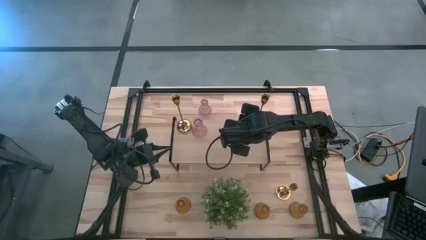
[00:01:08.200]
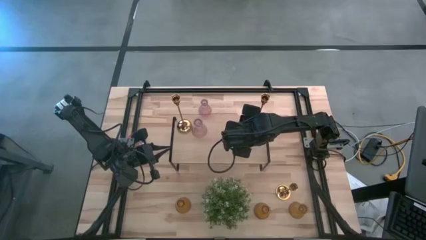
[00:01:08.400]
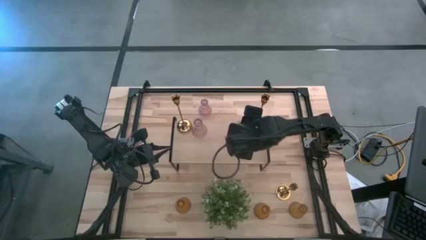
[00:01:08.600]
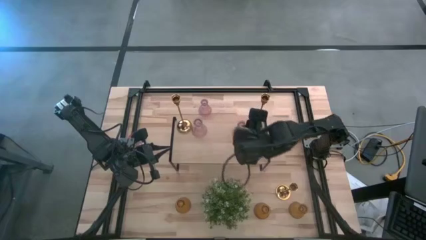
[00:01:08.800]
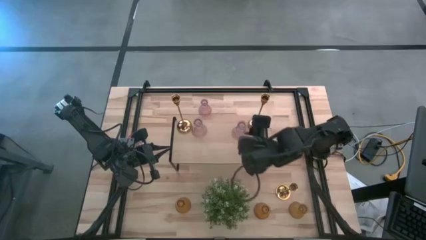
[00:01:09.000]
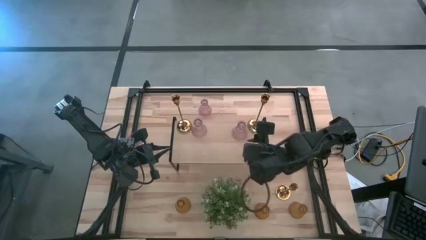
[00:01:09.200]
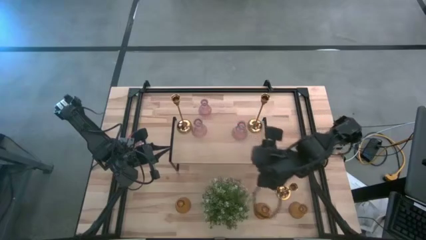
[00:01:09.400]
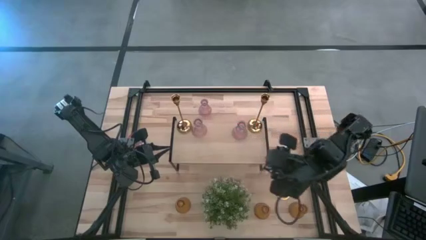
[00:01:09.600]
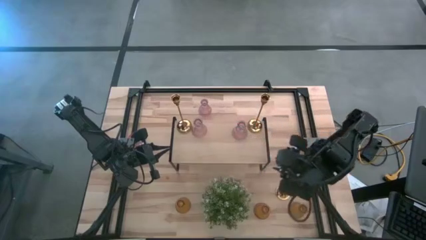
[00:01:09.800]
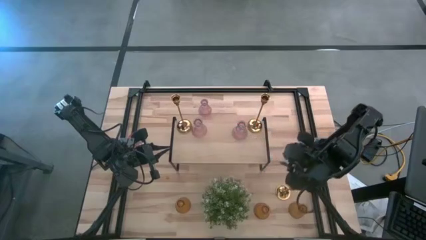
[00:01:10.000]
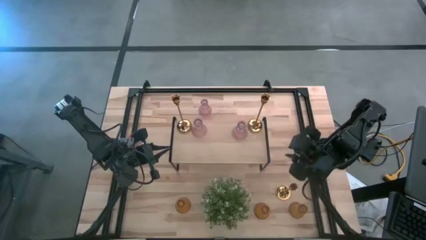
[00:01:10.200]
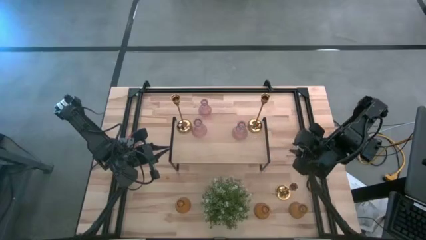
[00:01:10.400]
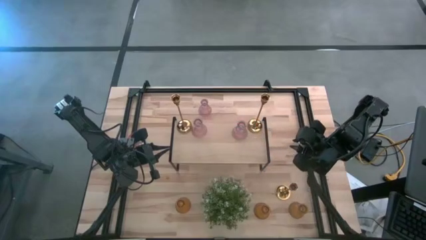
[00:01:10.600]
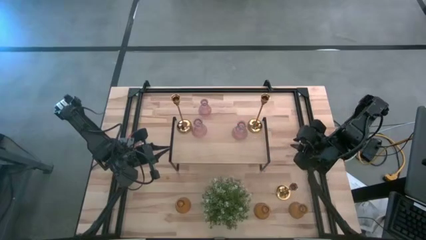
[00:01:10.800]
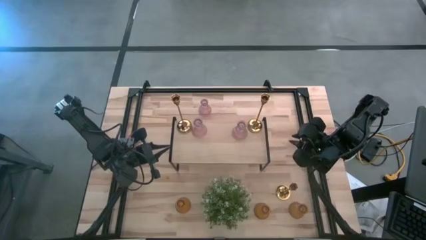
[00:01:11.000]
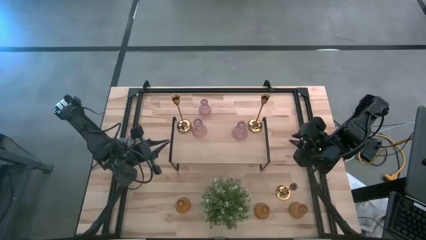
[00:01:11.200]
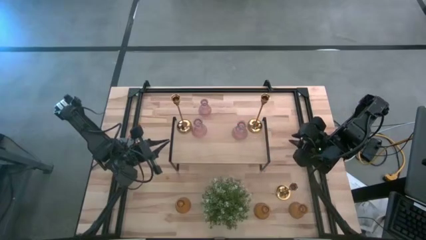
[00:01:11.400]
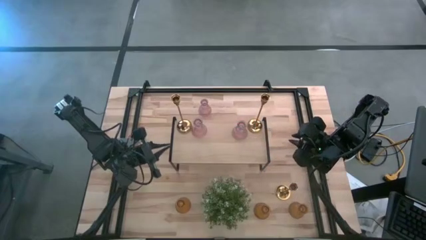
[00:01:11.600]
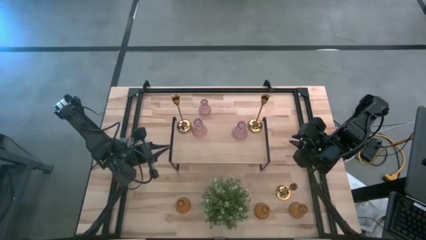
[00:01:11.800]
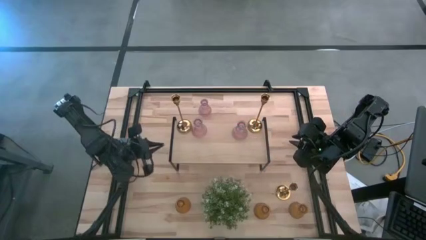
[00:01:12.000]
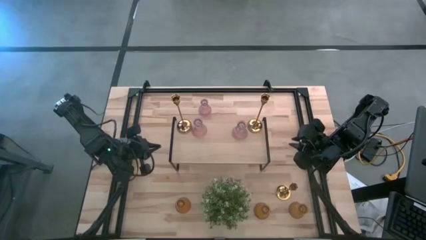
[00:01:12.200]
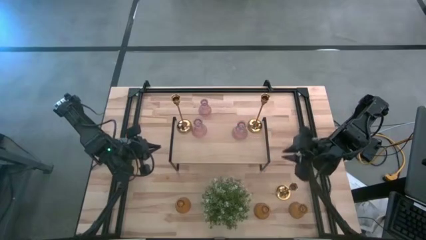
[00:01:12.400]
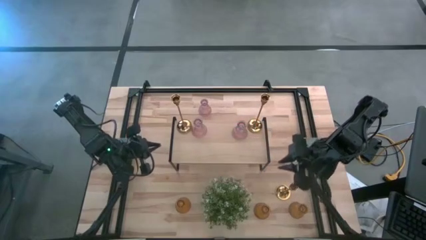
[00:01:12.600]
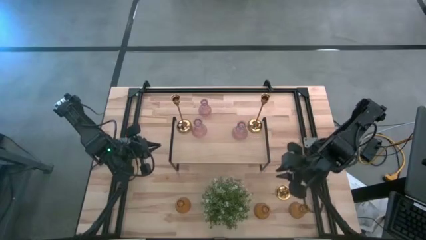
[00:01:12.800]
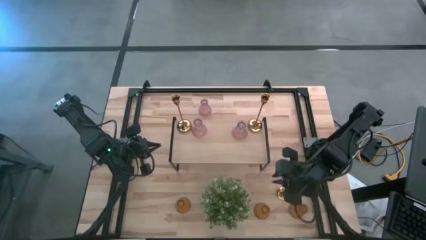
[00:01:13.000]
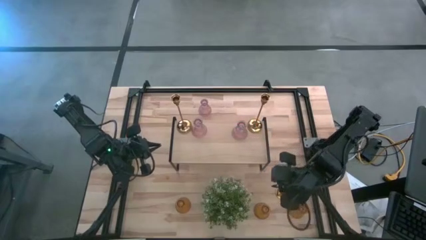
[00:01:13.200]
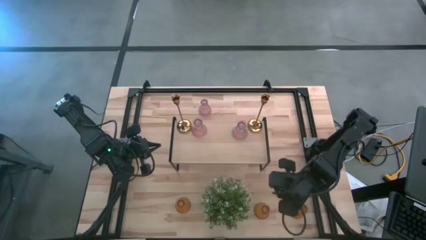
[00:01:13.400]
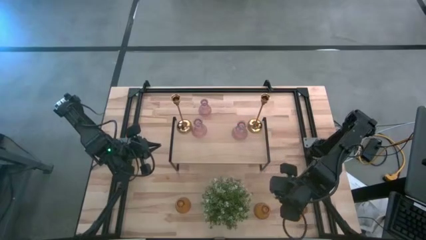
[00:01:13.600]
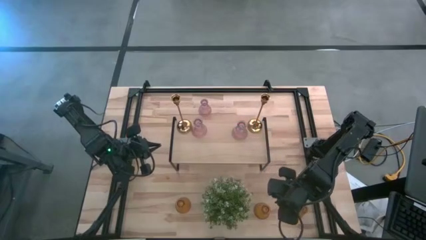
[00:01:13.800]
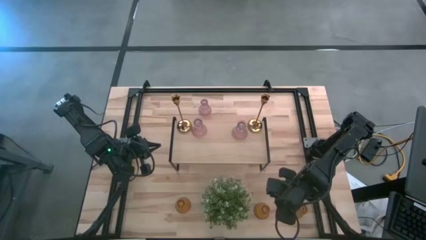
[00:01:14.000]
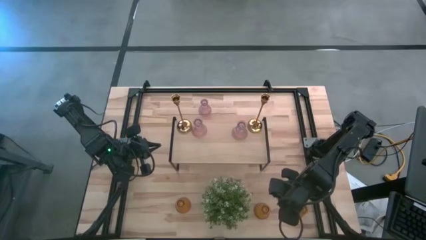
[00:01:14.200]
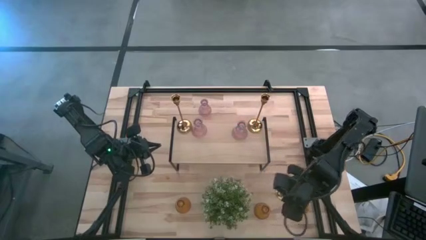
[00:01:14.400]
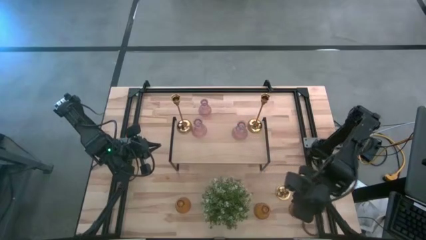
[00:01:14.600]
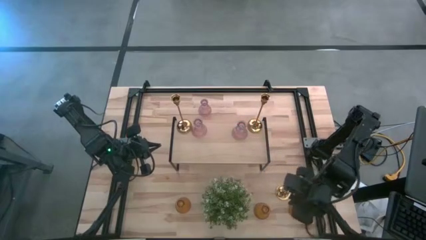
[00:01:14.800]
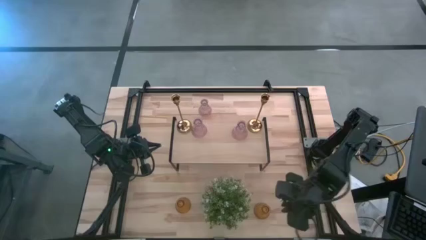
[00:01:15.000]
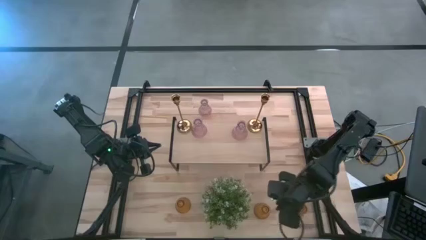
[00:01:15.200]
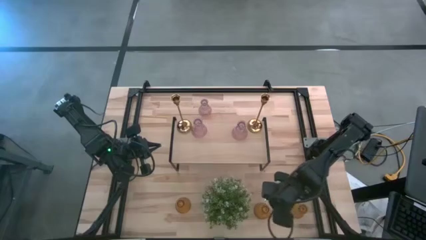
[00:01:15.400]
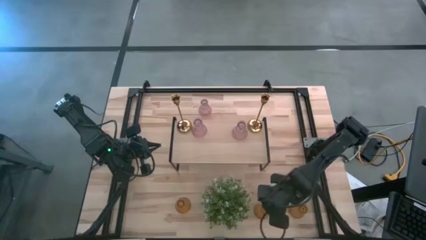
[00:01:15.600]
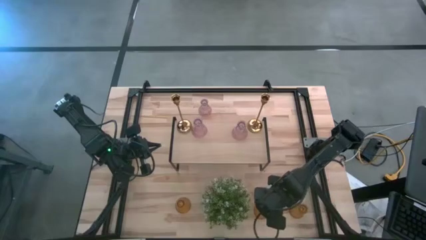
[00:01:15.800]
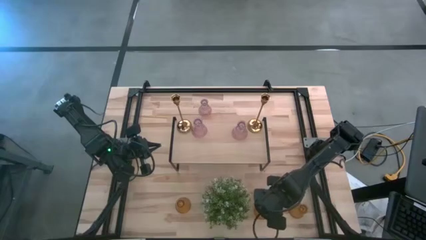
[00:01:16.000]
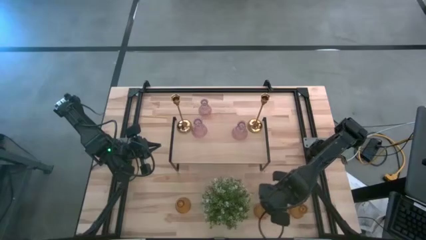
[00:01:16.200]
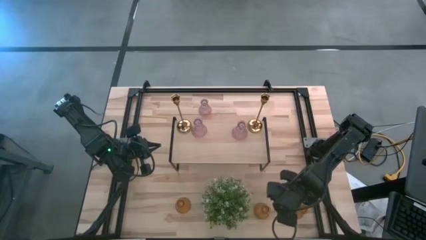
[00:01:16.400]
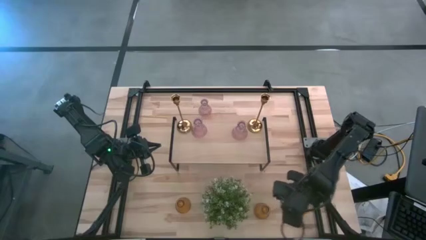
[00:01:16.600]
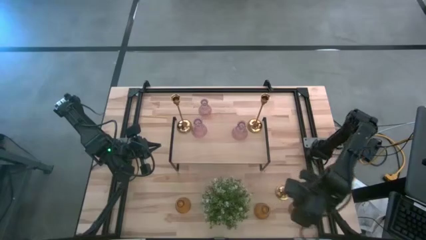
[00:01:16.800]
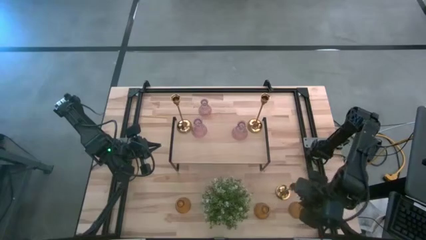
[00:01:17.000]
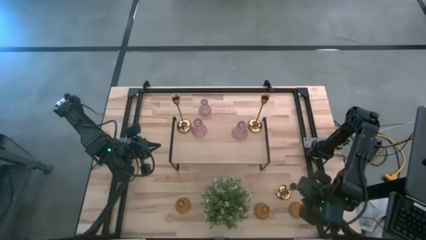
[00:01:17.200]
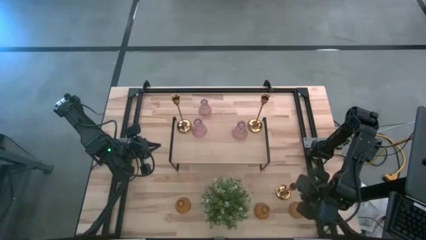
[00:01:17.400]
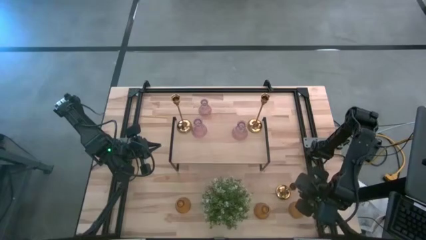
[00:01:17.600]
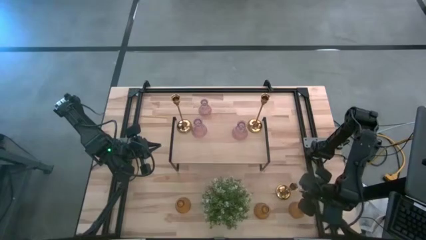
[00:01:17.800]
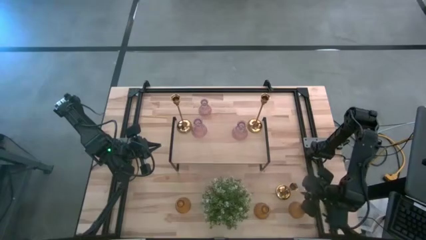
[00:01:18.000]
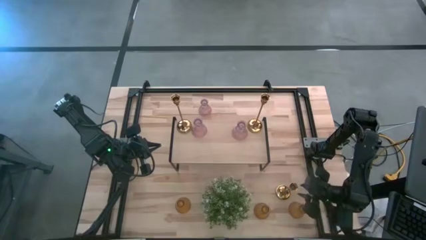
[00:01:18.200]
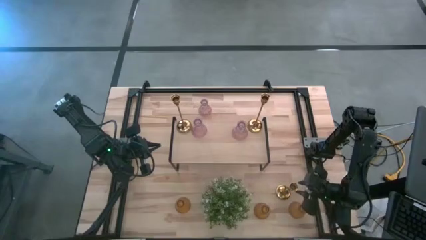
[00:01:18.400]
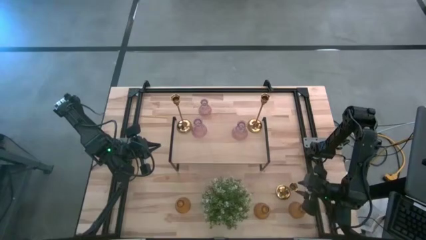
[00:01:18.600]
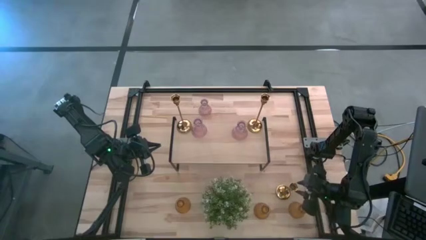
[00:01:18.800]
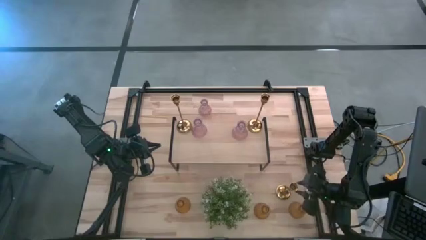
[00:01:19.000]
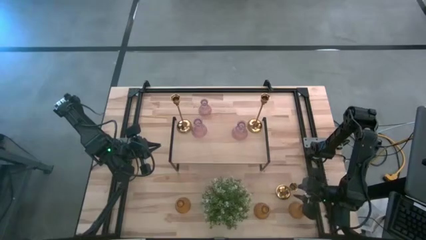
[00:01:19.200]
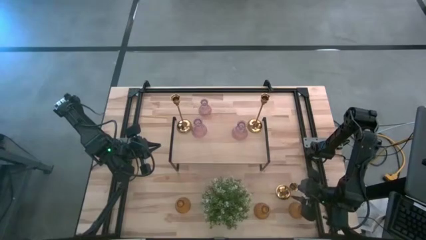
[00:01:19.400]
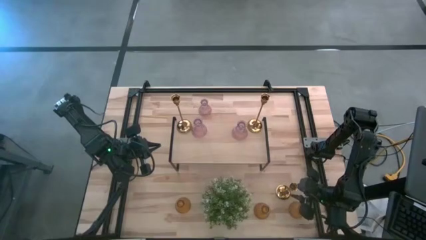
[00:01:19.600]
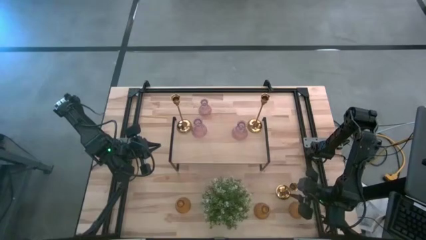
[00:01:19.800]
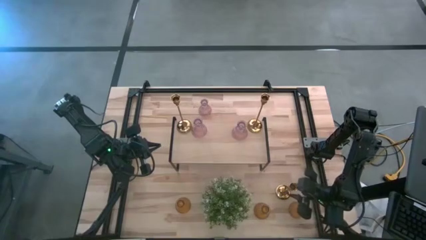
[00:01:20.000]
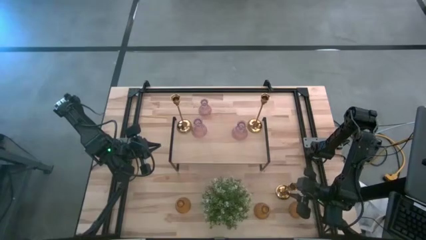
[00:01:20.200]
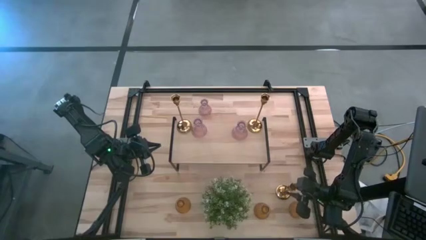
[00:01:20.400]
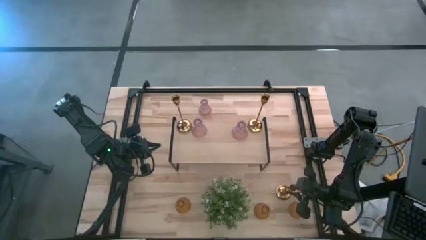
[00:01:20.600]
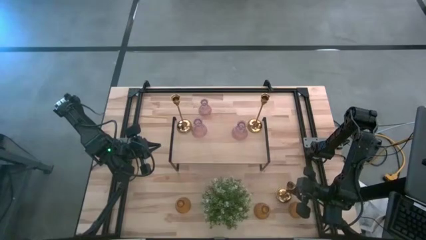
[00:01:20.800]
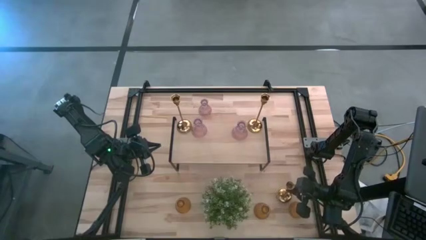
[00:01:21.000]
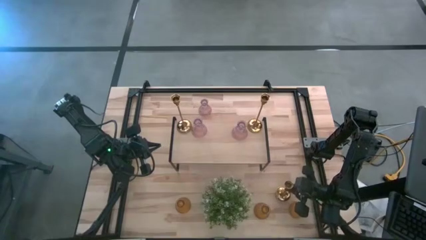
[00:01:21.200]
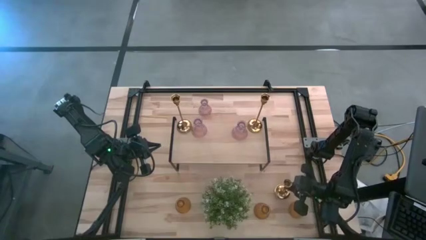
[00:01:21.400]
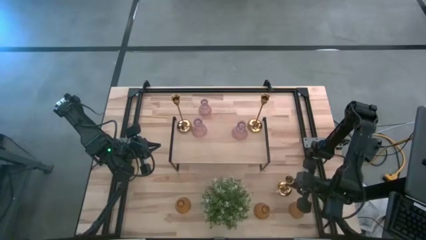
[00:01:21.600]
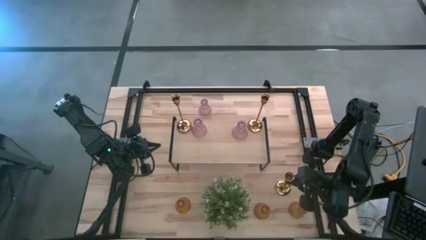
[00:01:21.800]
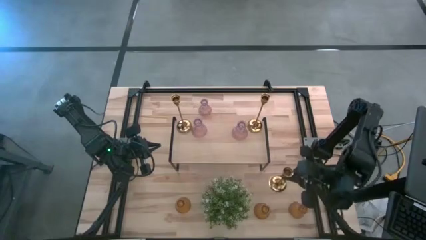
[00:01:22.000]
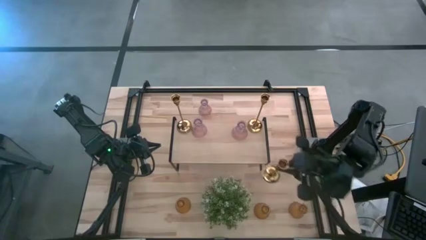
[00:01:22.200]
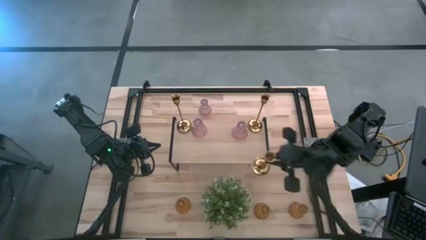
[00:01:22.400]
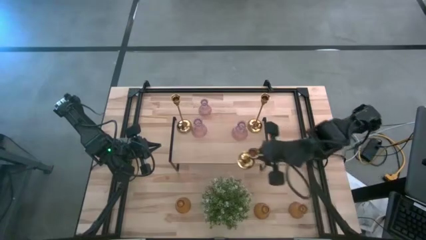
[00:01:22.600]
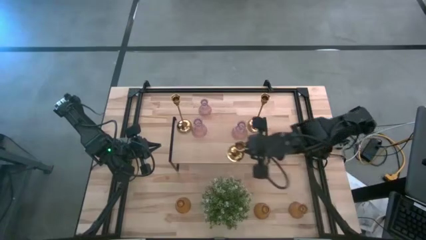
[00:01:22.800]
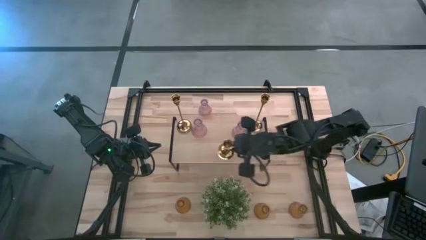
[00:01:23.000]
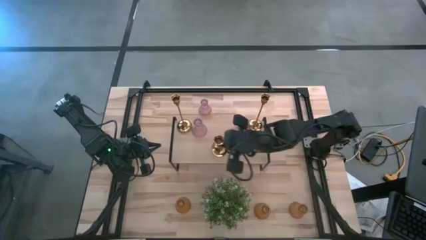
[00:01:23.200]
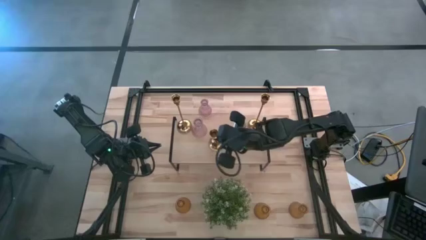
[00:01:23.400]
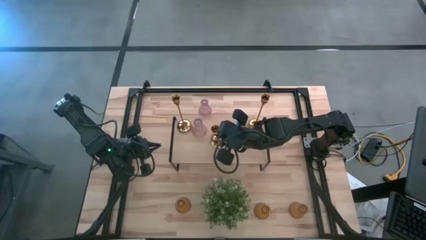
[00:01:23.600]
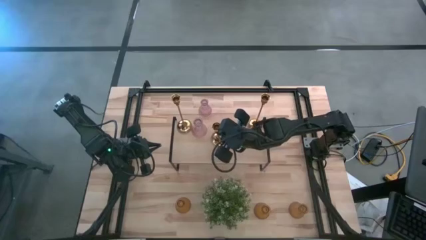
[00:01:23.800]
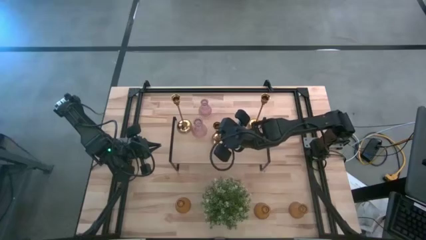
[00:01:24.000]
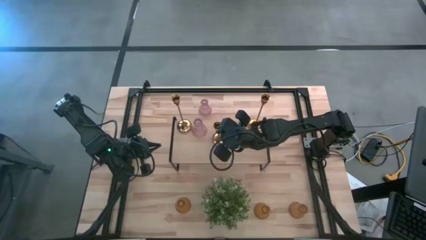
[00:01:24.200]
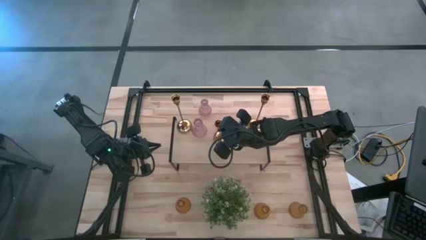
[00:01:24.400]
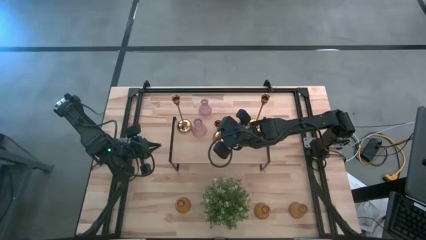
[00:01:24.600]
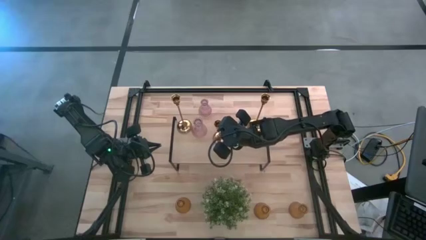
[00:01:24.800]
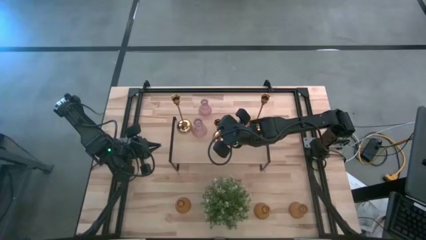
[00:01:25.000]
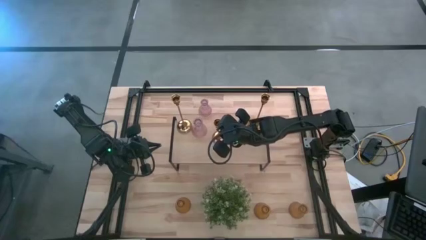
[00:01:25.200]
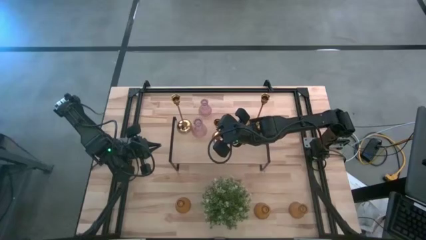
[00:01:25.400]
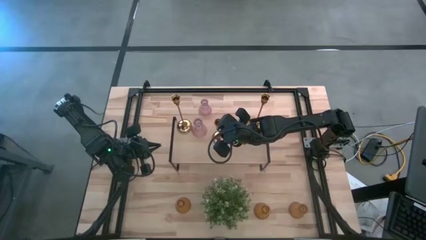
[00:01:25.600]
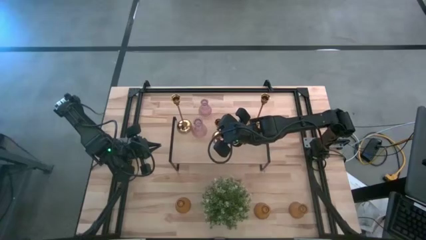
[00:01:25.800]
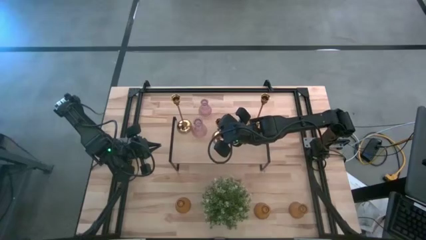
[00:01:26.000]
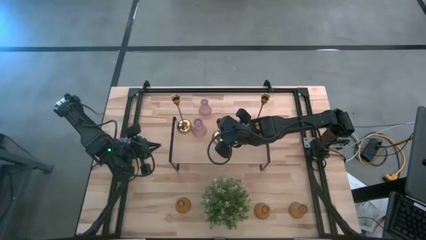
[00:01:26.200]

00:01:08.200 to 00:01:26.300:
Task: Pick & Place candle stick holders
Put the gold candle holder on the shelf
